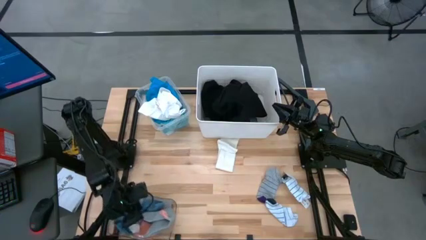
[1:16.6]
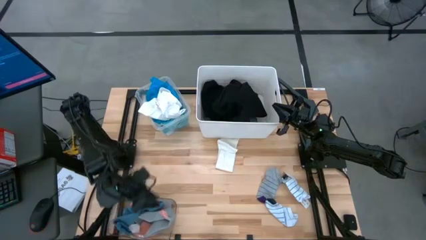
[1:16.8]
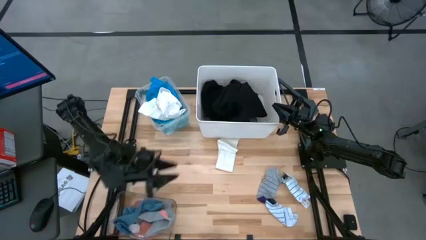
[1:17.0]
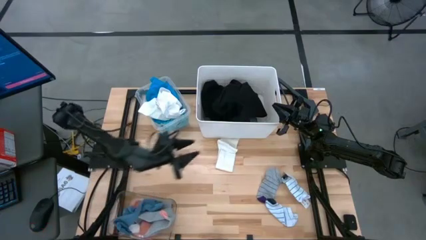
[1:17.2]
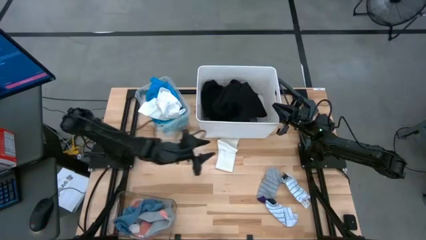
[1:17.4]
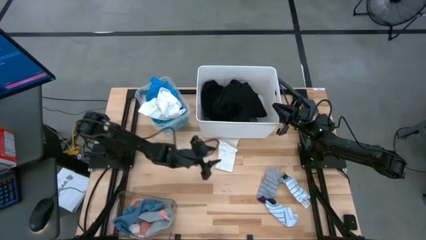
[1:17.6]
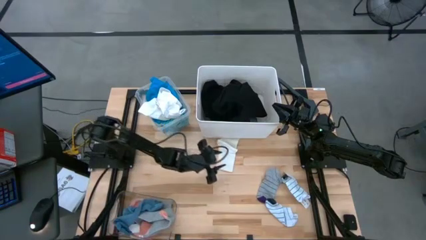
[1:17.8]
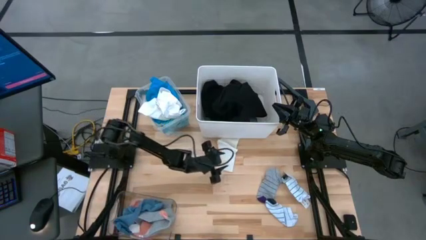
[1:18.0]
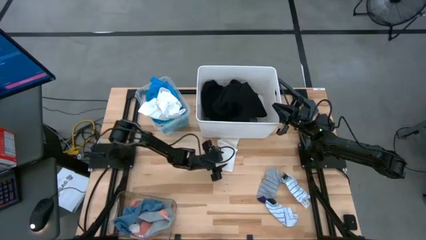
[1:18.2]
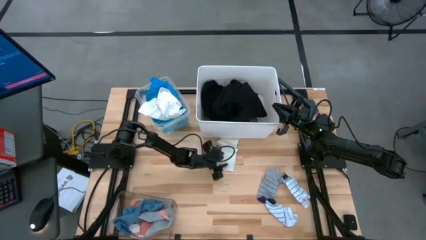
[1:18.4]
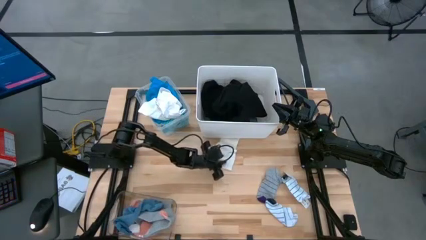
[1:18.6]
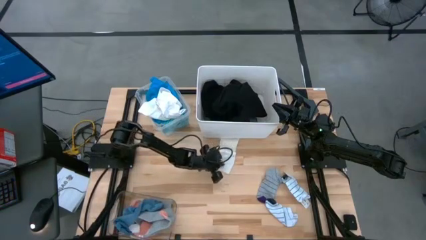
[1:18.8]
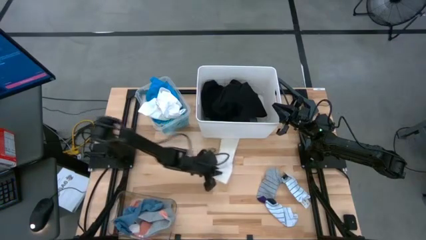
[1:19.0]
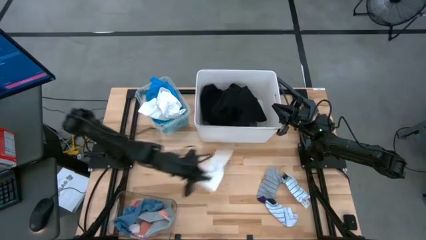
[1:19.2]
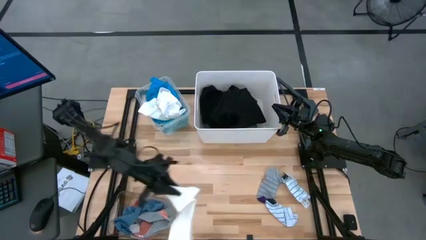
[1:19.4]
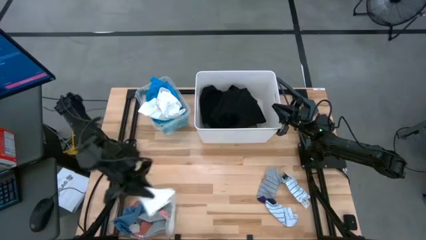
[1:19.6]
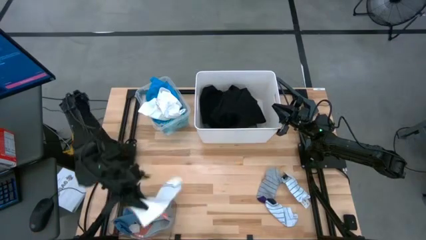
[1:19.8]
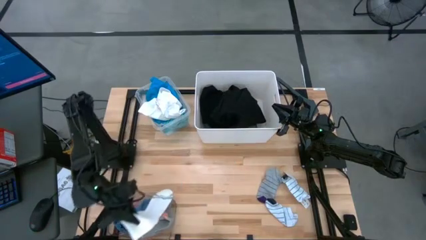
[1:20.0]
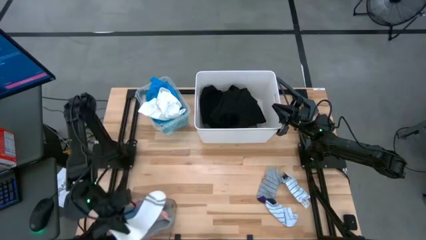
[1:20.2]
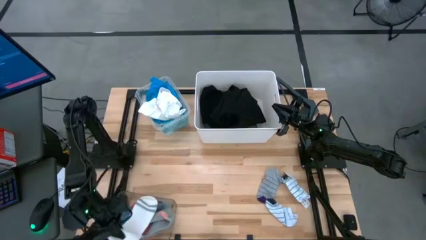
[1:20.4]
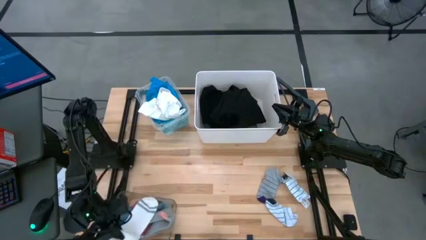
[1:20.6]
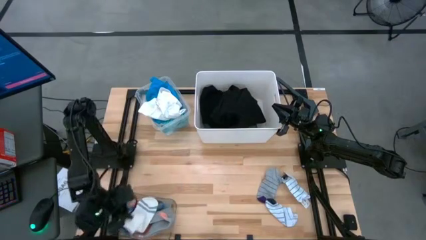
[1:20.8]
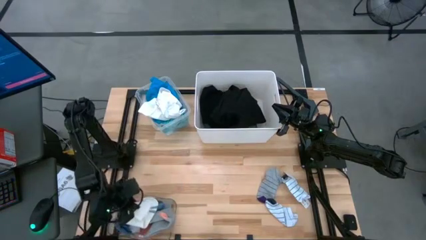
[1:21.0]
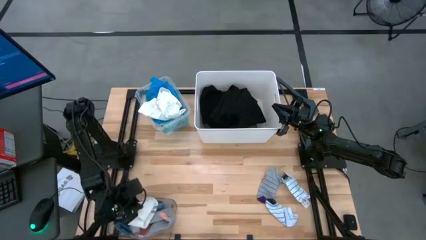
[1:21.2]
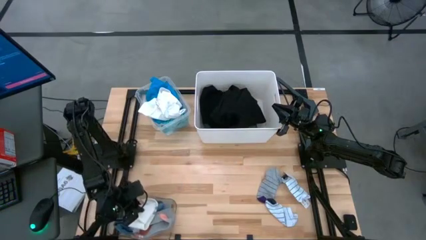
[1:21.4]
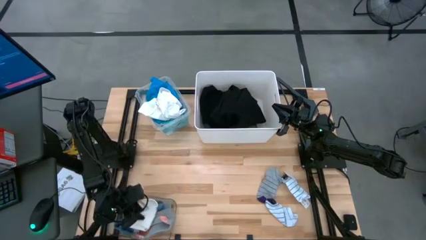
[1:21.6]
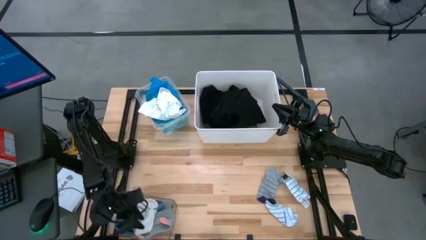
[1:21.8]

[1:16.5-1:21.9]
Task: Pick & Place Cloths
Put the white sock into the transparent bin

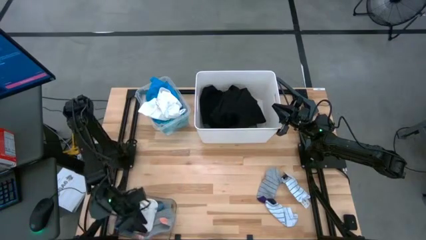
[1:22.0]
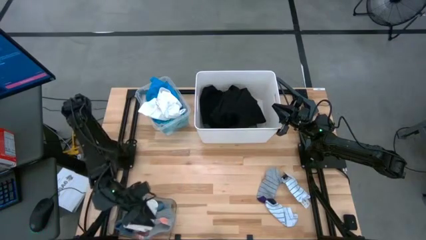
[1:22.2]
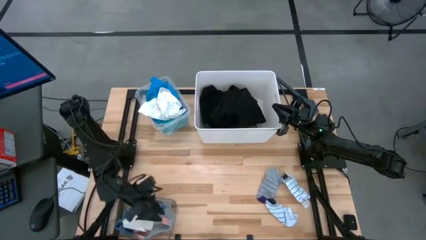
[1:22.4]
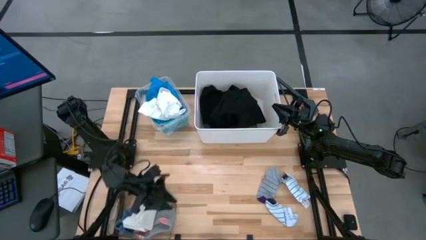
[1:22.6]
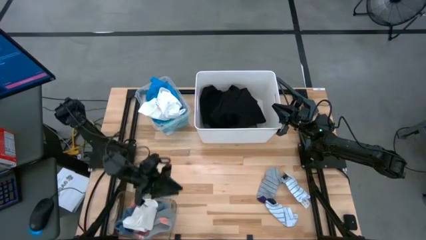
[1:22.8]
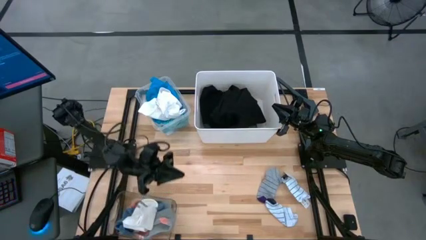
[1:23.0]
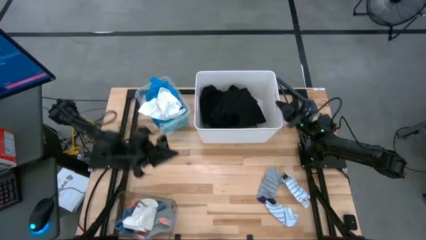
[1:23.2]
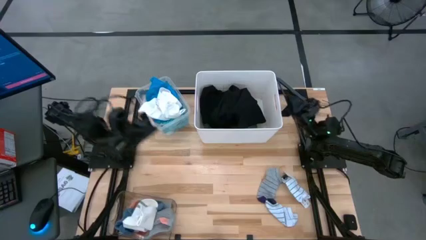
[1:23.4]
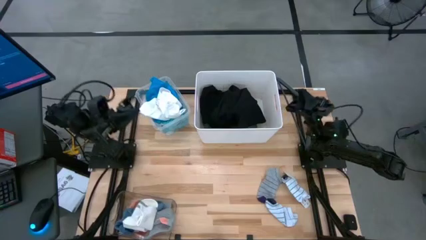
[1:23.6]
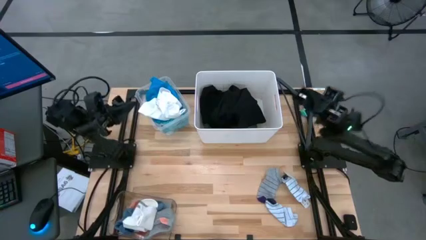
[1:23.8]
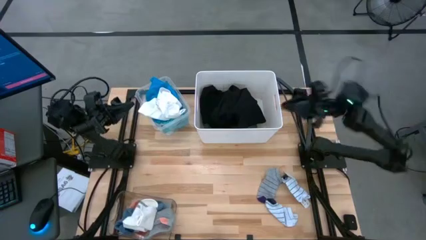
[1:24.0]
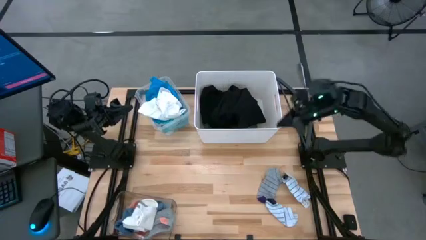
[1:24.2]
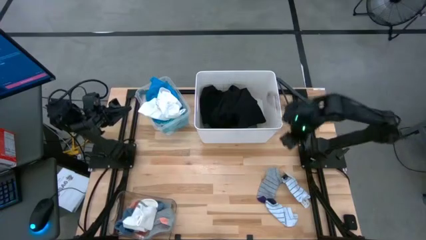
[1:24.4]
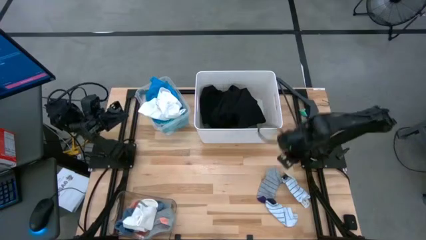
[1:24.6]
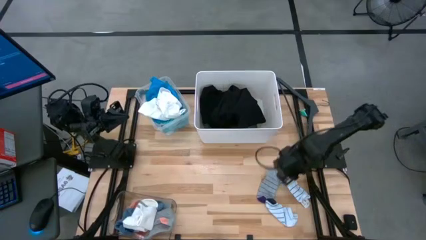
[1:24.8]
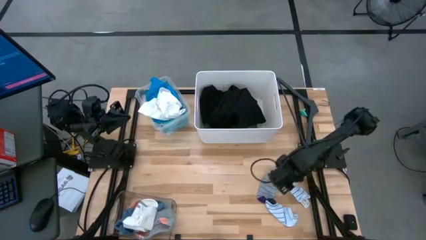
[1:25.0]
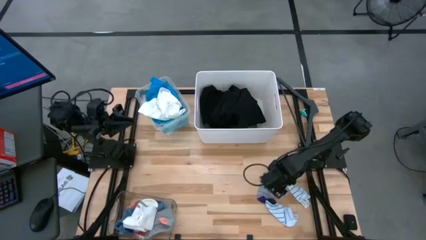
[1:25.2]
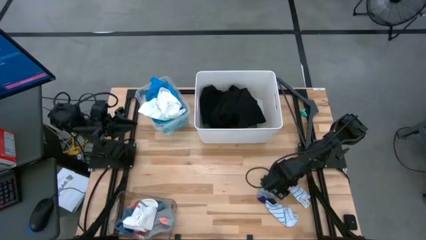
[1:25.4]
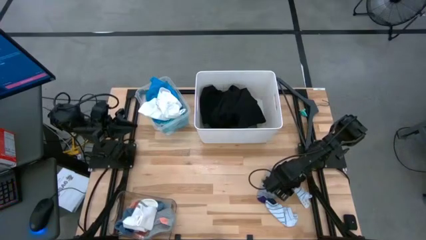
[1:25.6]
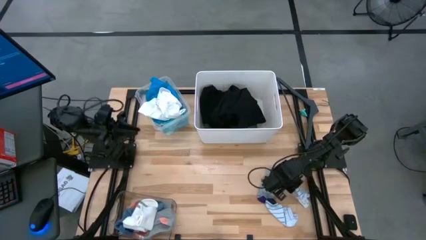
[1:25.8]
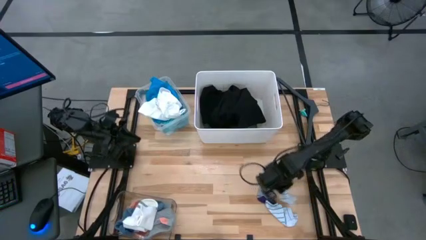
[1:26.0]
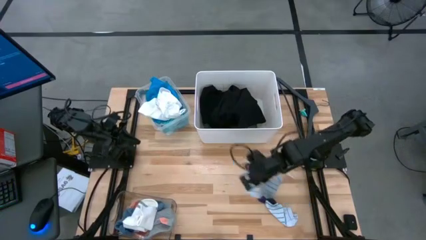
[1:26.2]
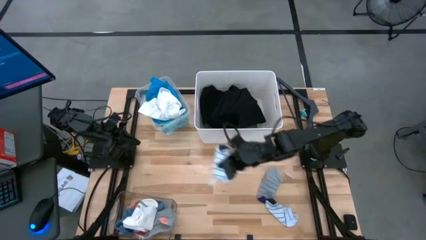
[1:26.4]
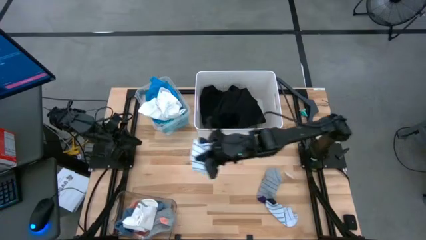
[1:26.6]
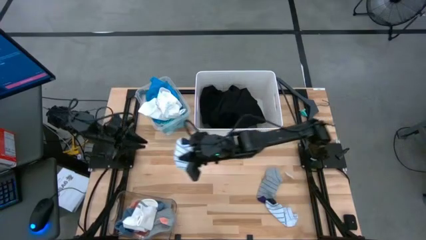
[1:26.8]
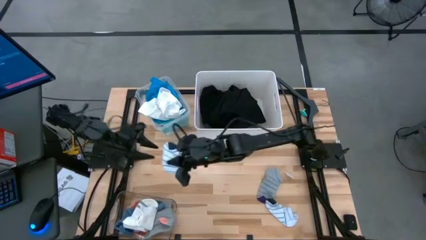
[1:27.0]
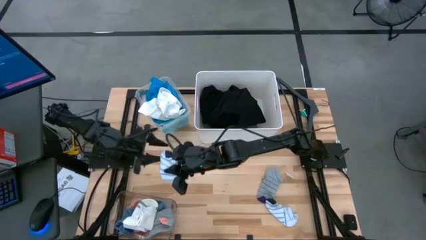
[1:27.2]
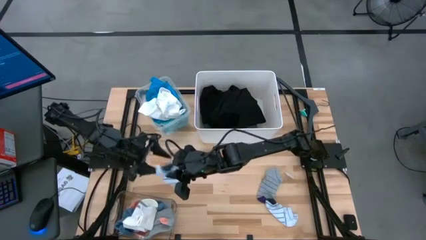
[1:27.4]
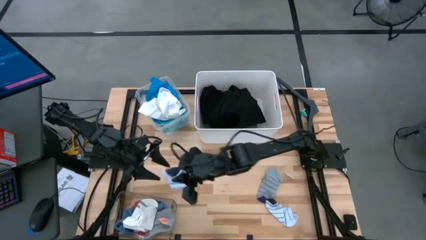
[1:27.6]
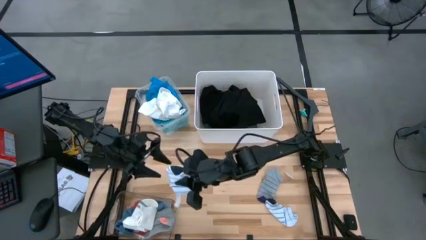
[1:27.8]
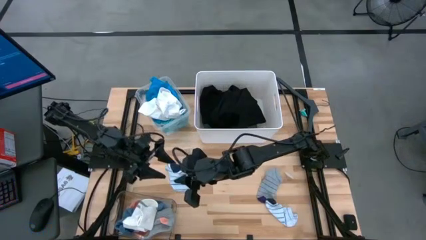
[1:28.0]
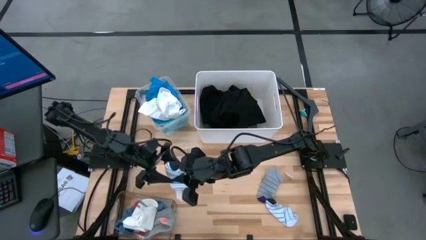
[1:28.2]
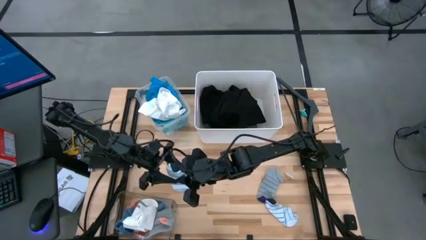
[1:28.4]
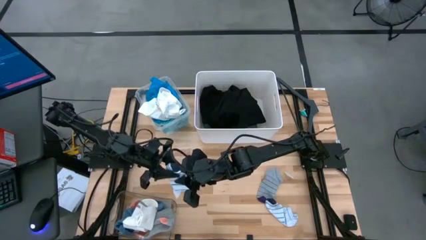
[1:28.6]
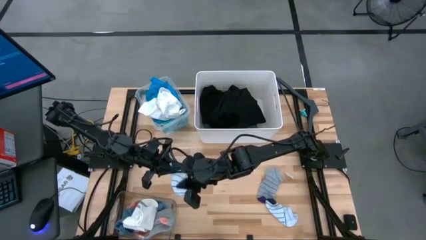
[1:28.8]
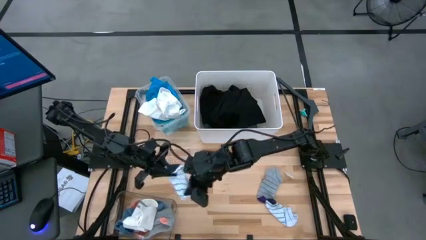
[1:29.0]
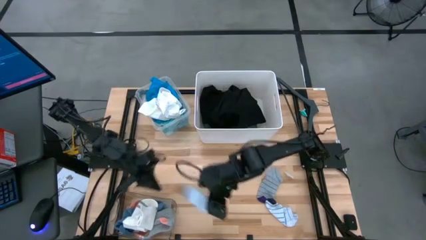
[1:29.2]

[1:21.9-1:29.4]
Put the top white sock into the transparent bin

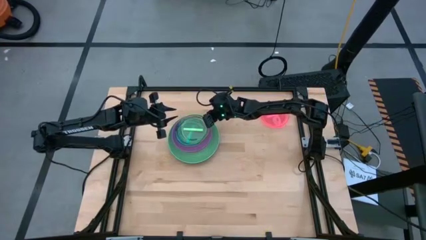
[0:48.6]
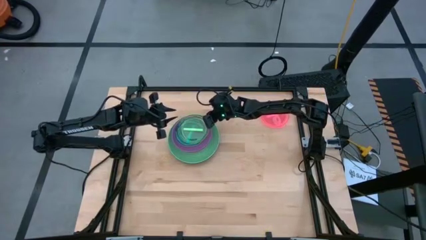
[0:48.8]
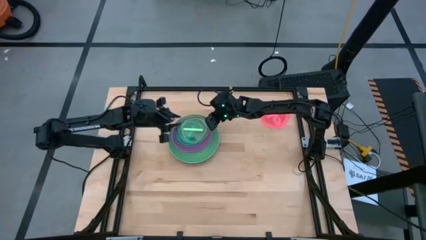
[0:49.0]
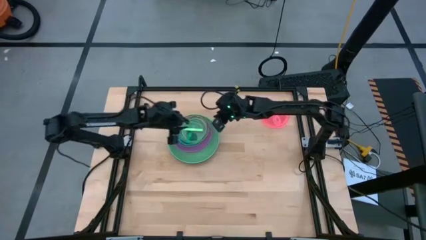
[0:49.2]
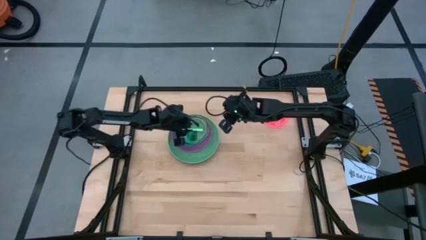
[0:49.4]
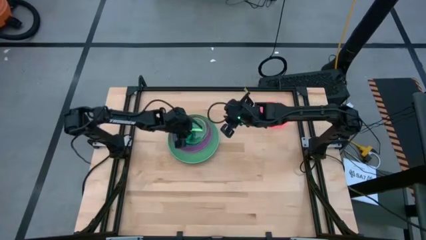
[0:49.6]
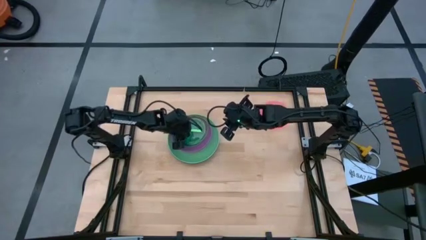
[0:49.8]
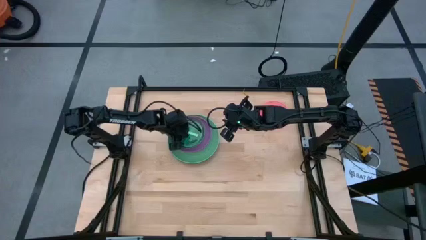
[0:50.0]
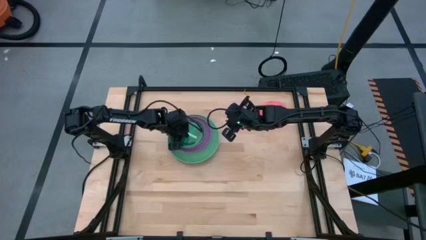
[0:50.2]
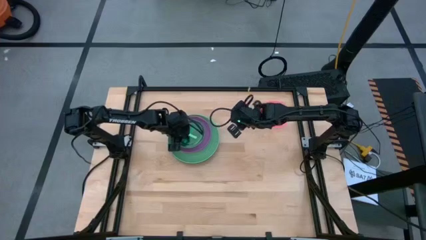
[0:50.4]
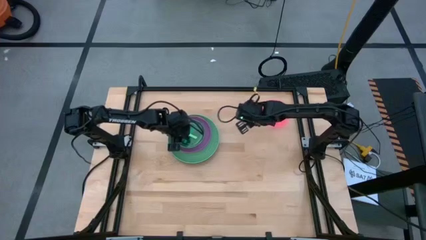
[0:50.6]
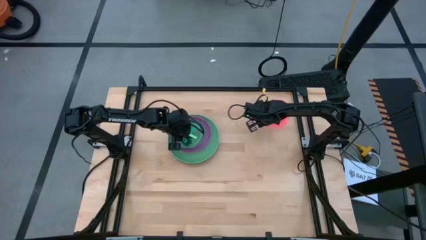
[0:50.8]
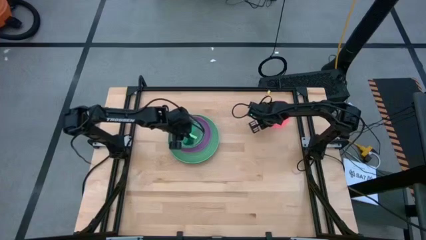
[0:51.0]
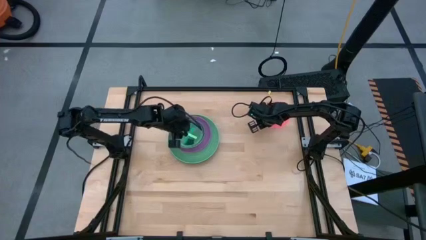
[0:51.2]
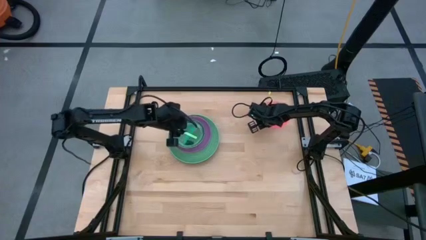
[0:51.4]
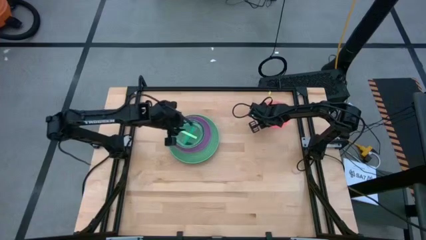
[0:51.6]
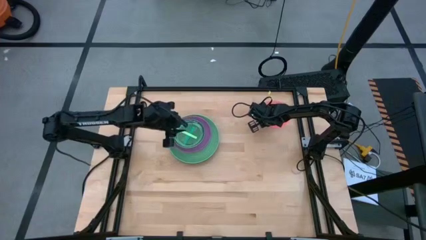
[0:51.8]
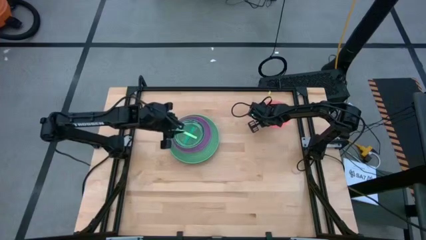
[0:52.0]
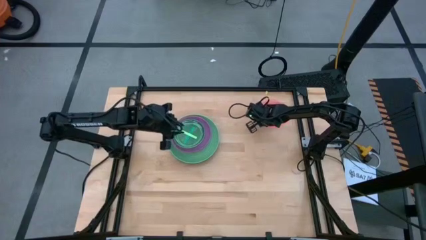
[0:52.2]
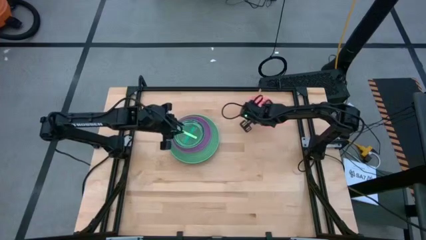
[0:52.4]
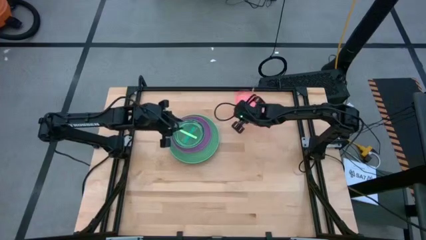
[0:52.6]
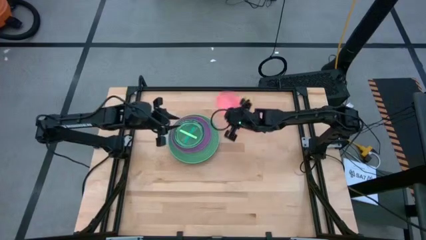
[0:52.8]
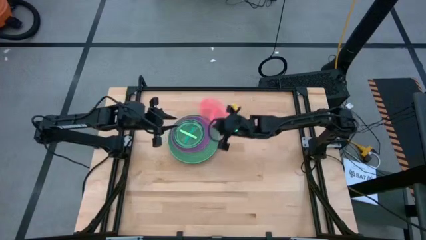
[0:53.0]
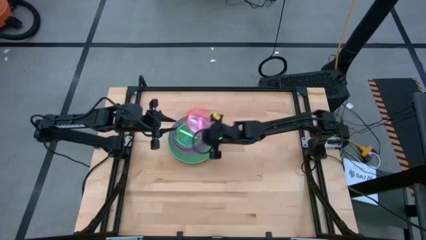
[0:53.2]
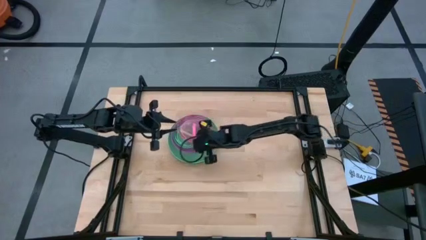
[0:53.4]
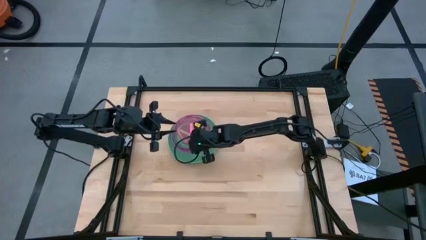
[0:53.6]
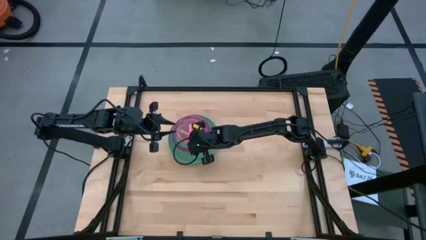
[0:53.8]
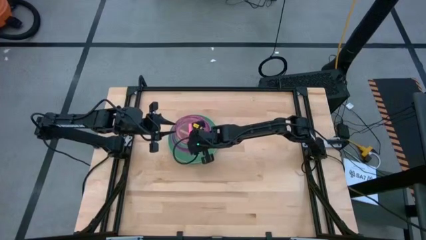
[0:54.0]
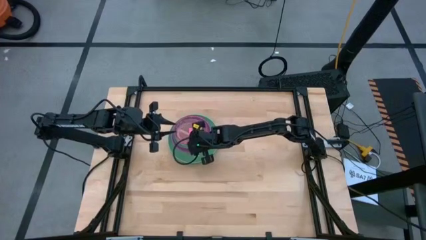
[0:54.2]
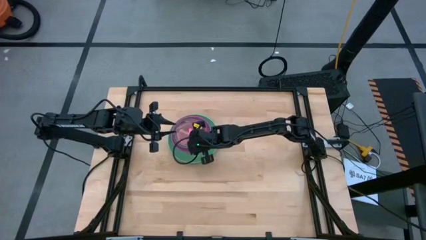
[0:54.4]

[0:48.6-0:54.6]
Task: Stack plastic plates
Stack the transparent pink plate on top of the transparent green plate
